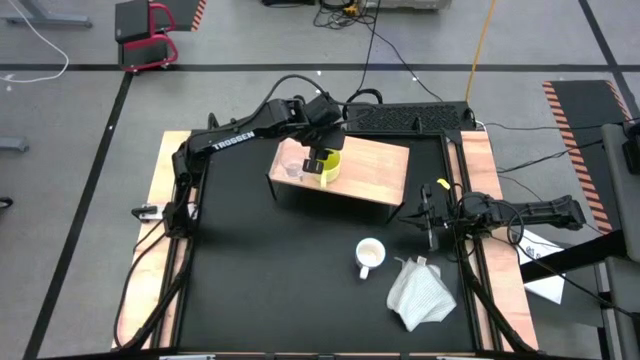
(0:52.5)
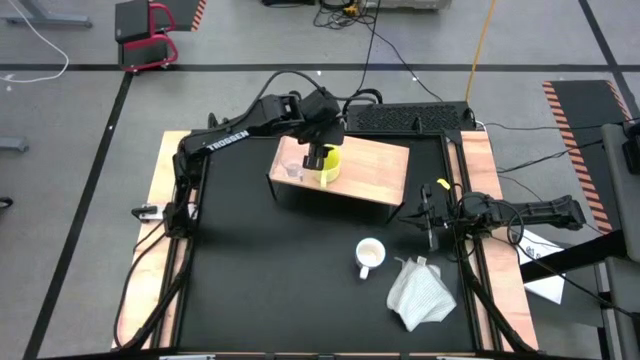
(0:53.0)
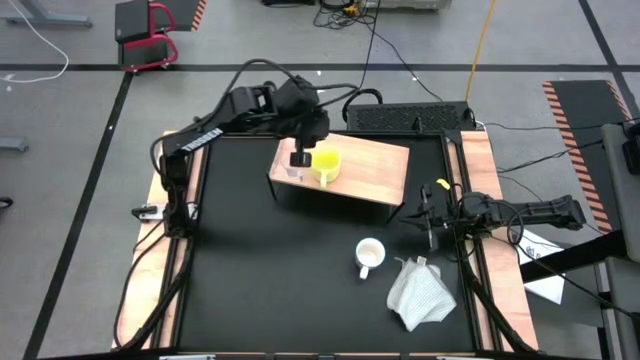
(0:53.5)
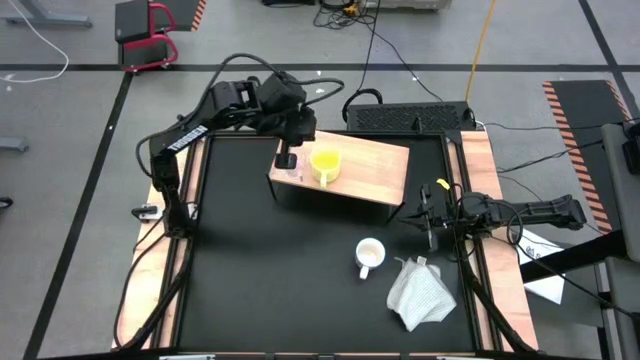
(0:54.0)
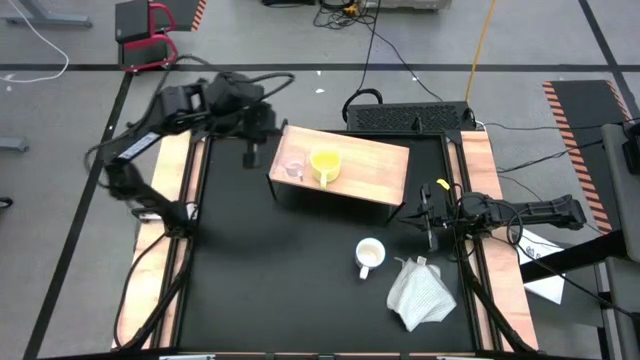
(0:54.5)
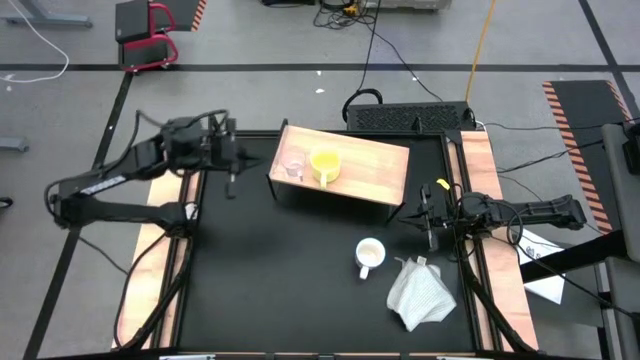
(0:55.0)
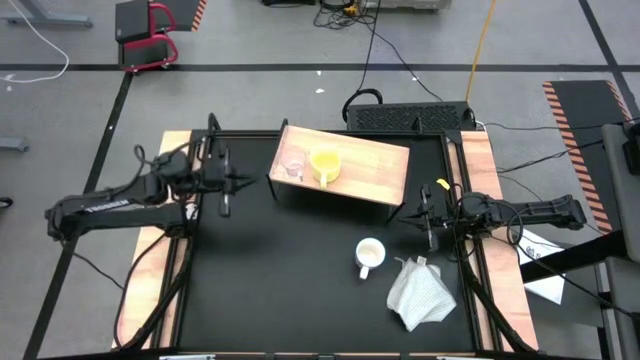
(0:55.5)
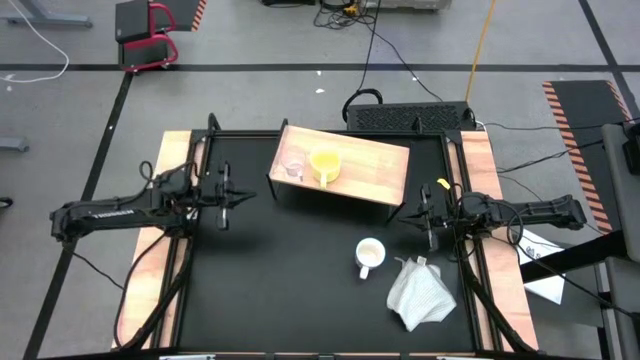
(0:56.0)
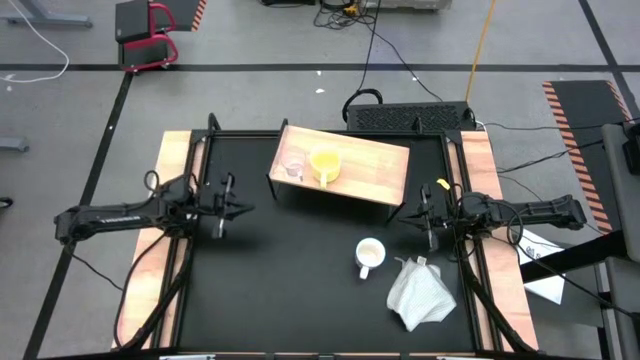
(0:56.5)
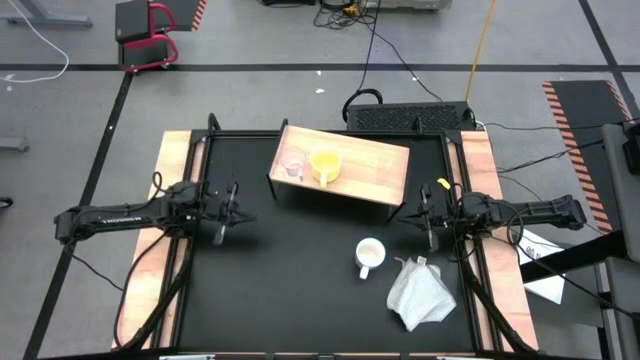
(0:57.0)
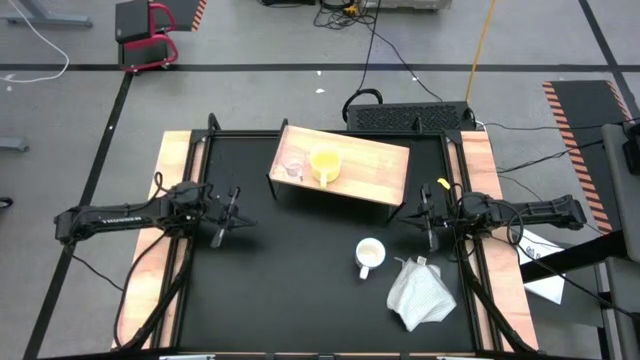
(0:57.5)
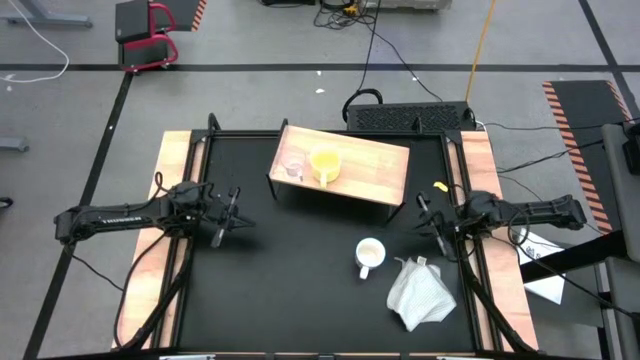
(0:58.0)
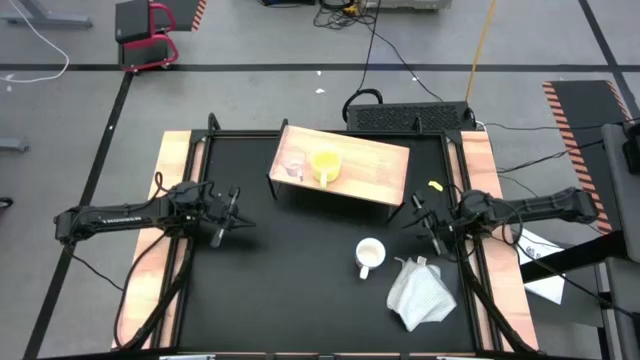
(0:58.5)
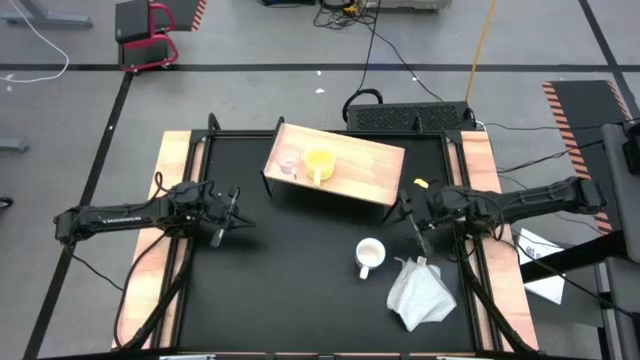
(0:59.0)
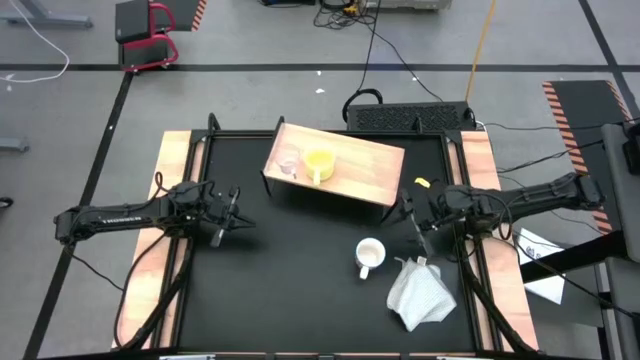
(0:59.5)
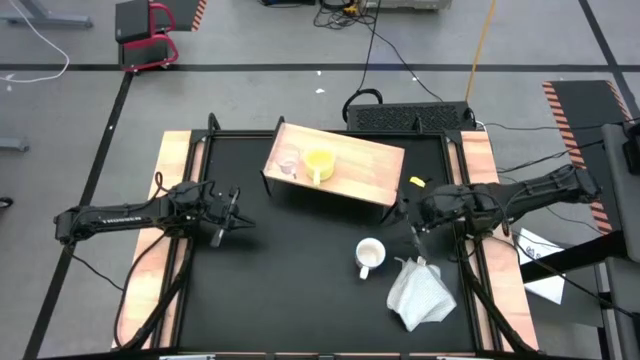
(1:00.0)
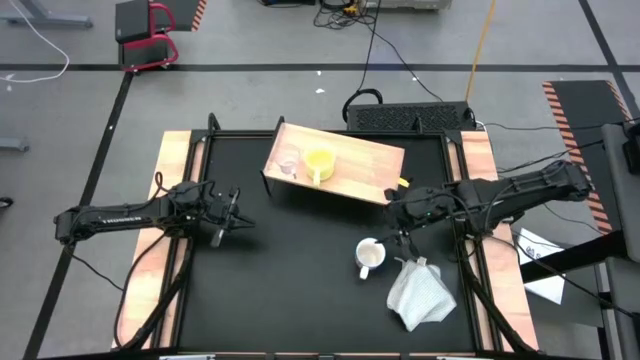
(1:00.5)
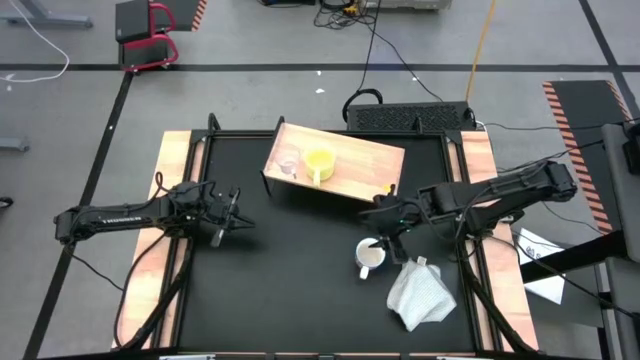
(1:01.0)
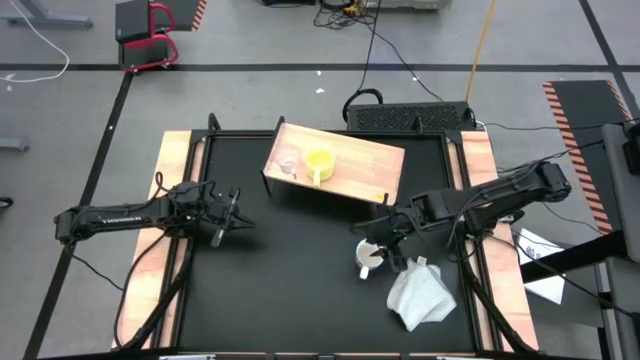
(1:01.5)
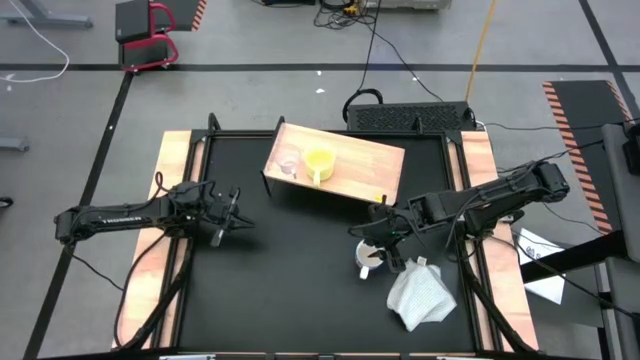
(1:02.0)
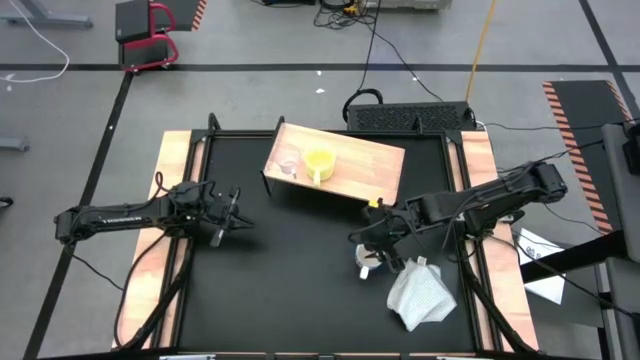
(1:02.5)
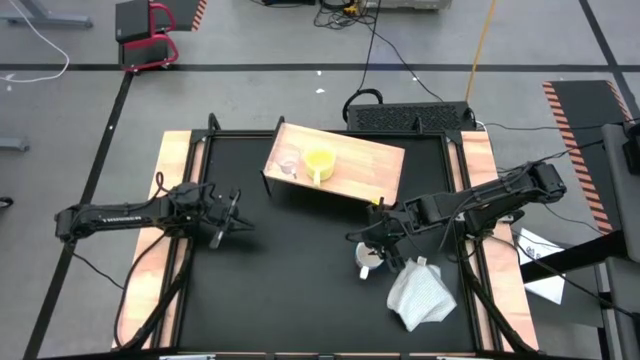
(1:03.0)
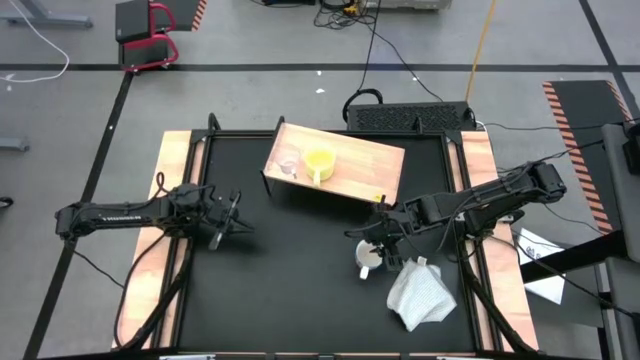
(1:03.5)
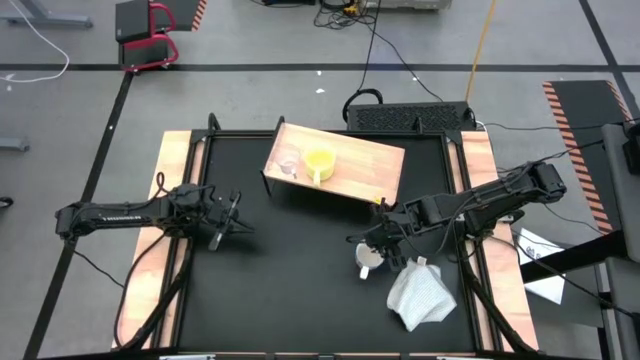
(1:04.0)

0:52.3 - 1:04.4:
Task: Stack small to large cups/mugs on shelf
Put the red mug on the shelf

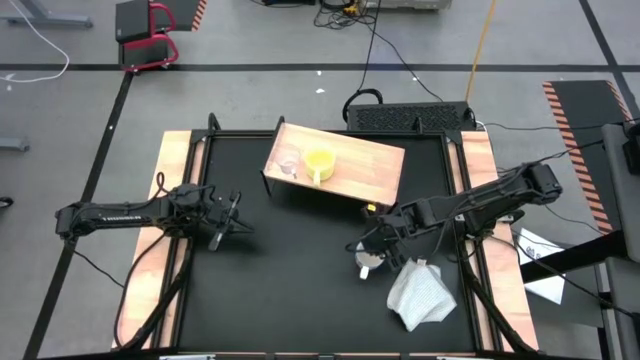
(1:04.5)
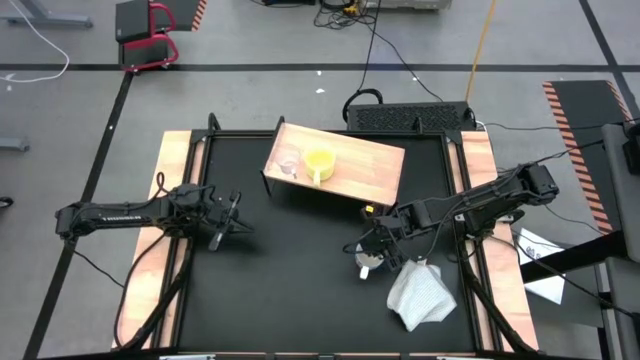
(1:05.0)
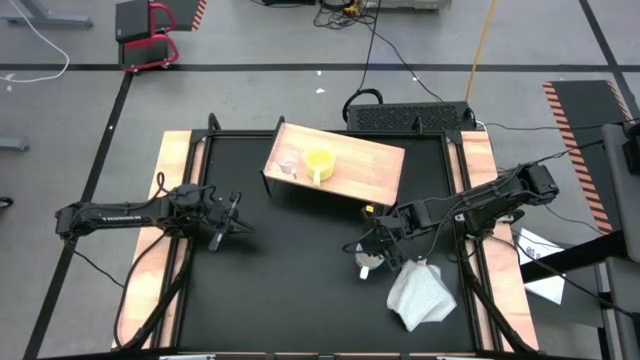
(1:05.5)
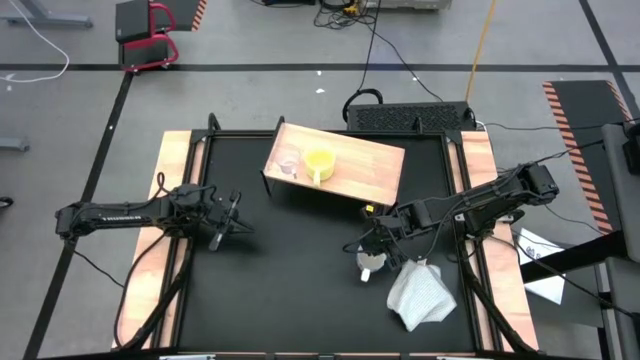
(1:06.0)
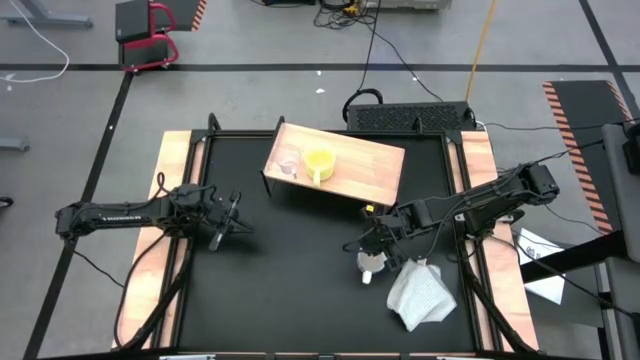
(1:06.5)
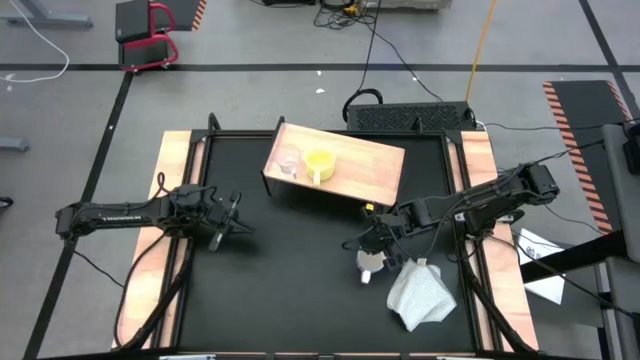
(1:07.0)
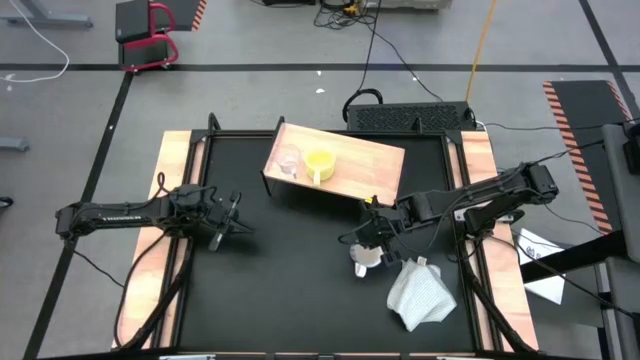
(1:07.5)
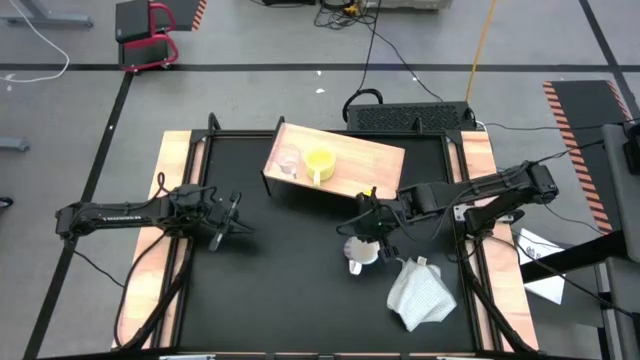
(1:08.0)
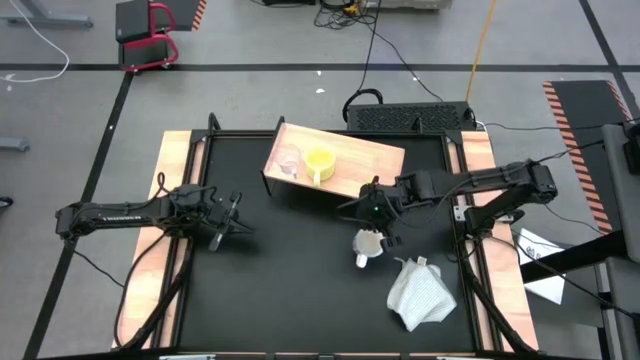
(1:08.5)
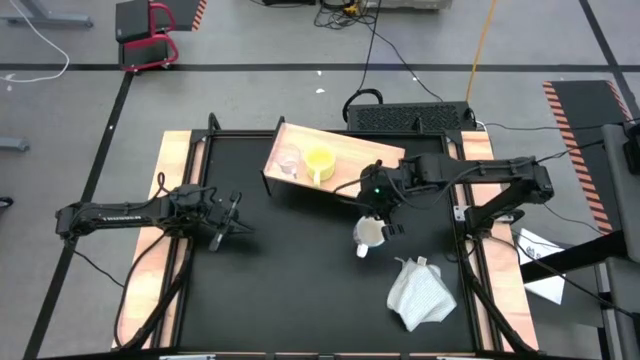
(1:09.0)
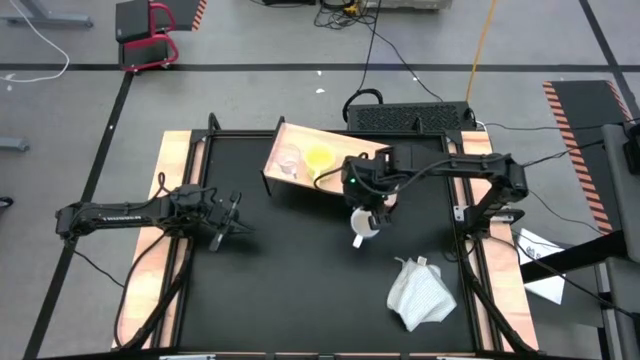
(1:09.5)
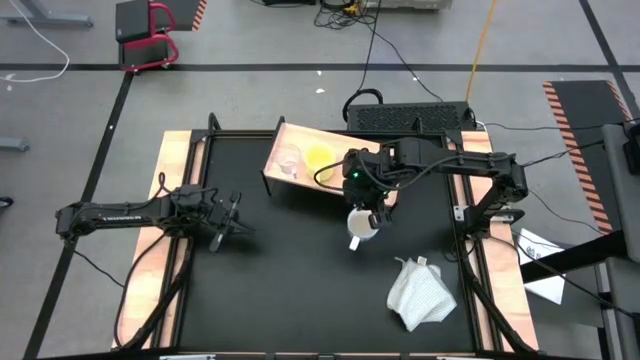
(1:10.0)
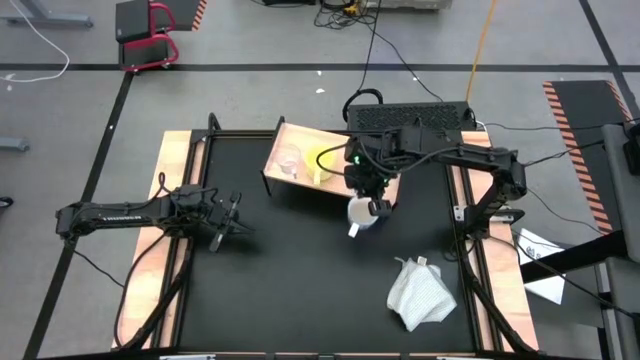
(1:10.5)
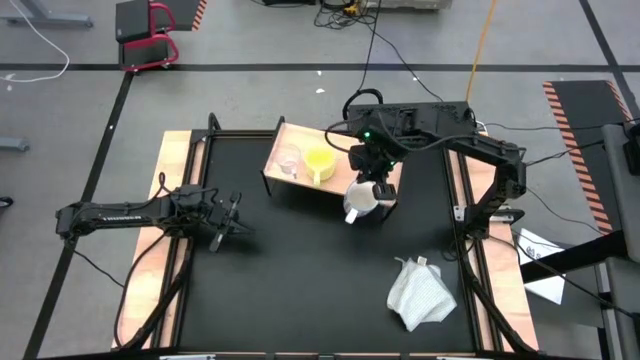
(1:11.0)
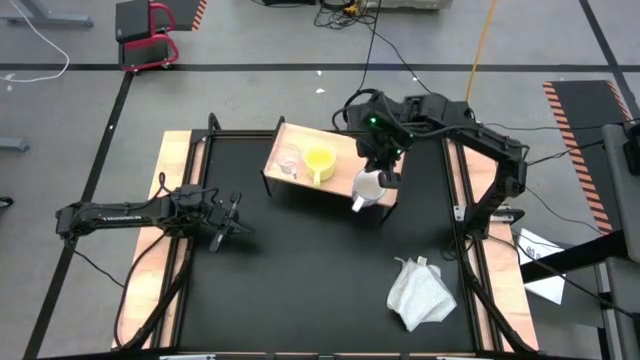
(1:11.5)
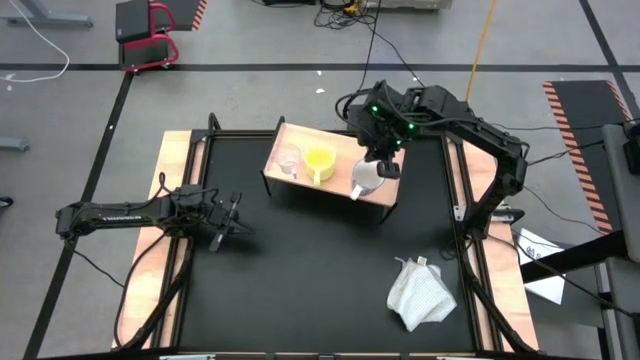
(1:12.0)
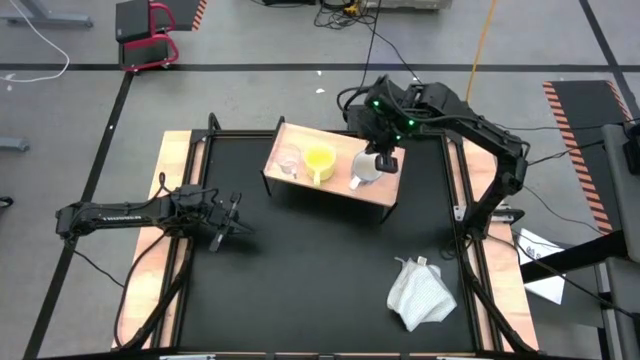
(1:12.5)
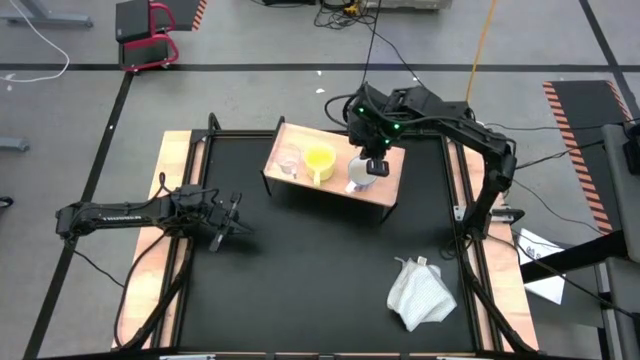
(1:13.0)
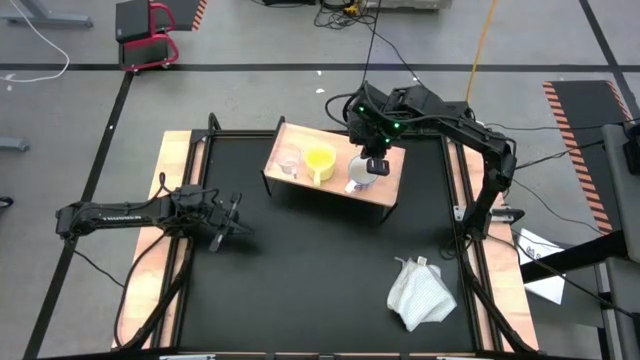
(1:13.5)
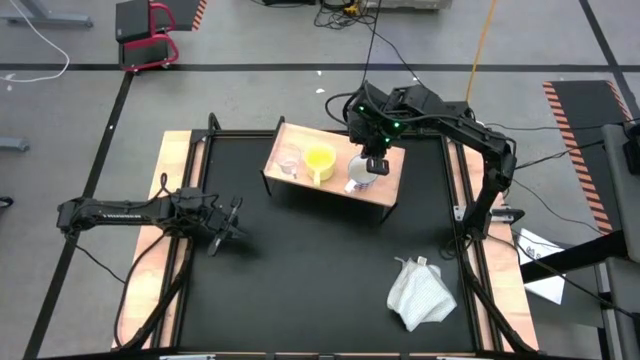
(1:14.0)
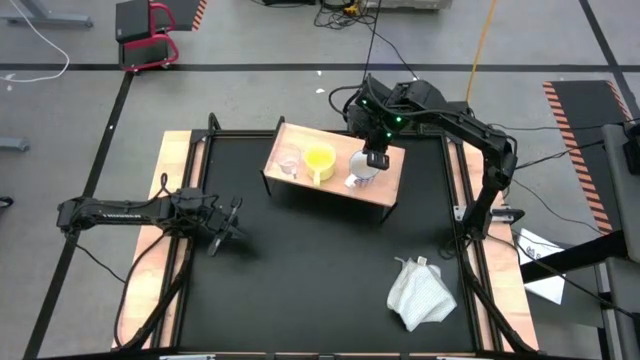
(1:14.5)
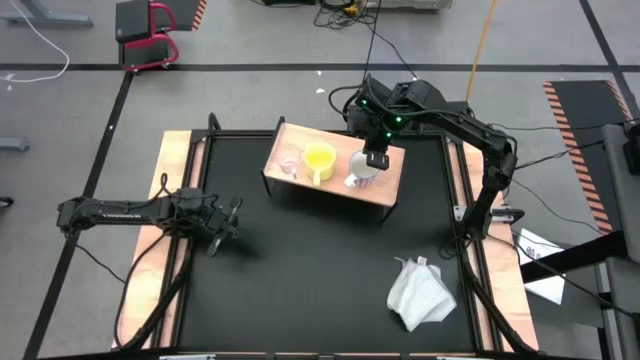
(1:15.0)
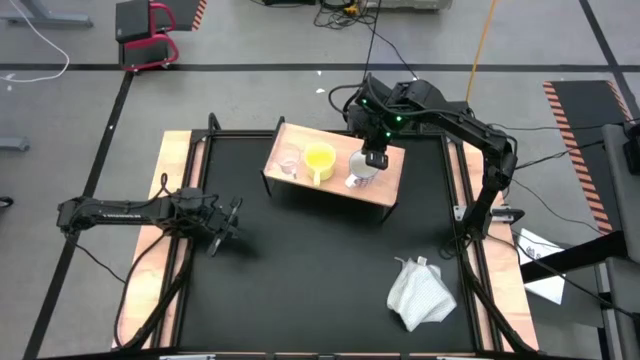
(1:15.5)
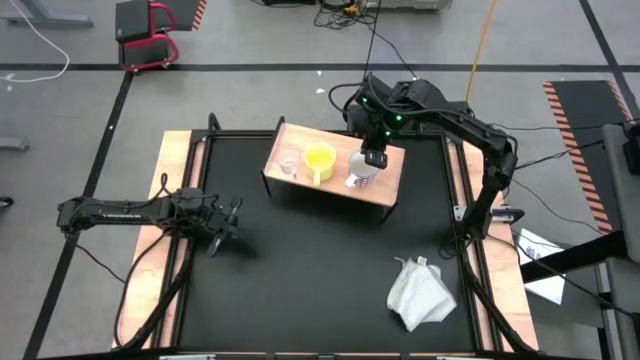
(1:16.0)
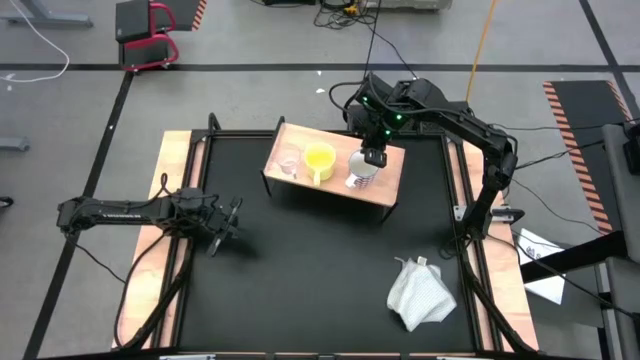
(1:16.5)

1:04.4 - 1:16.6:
Put the red mug on the shelf
